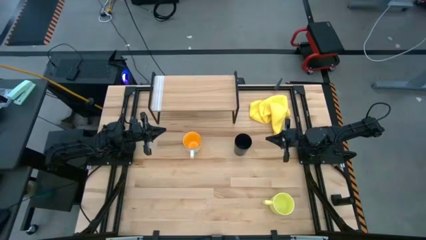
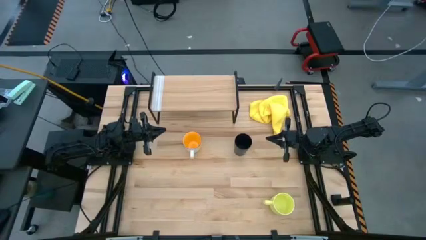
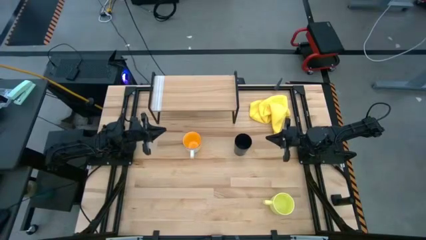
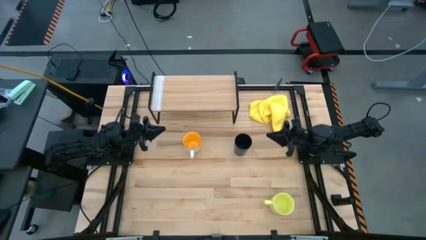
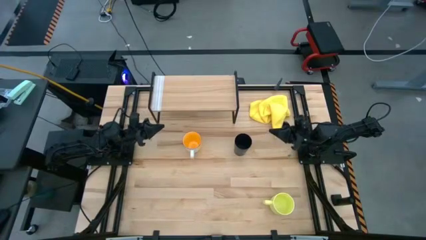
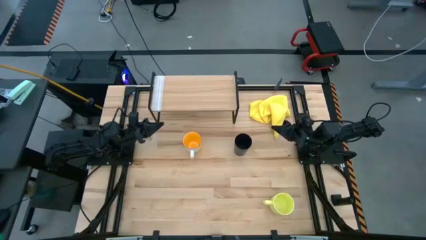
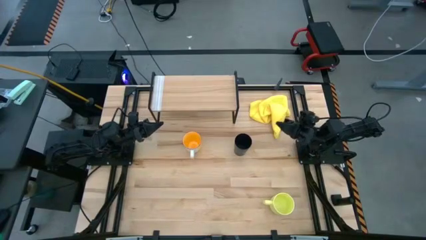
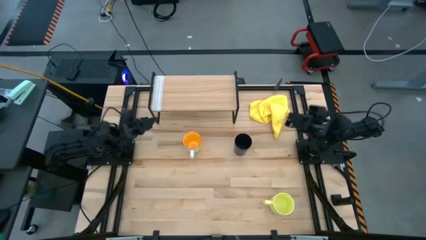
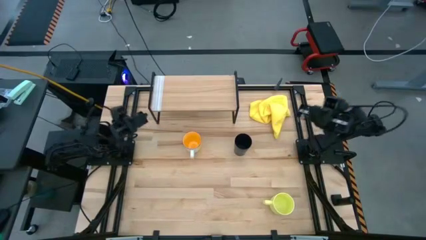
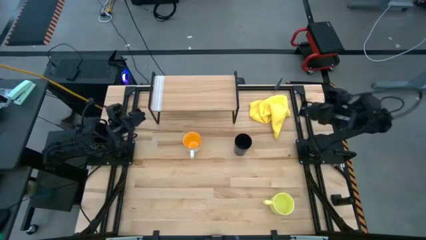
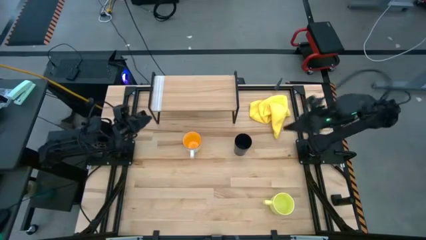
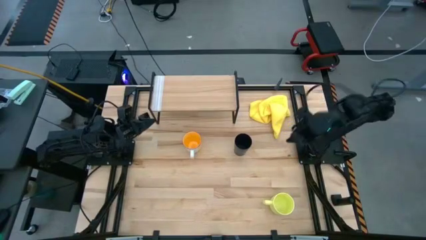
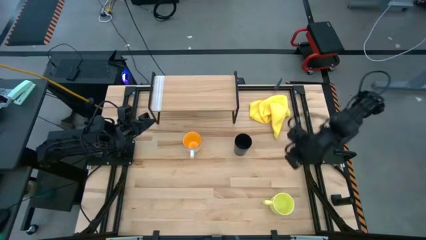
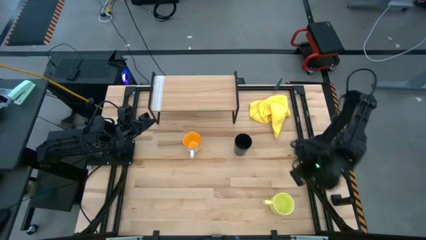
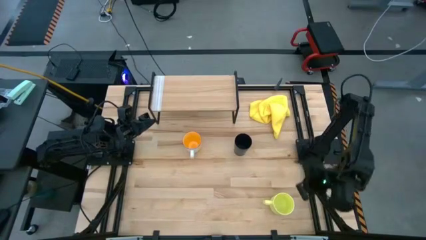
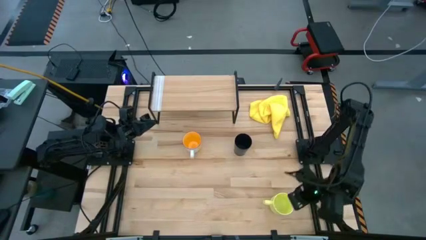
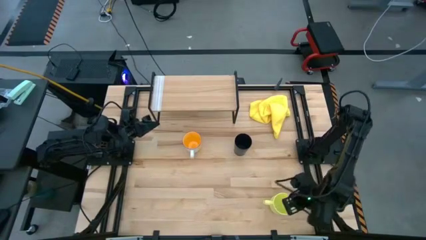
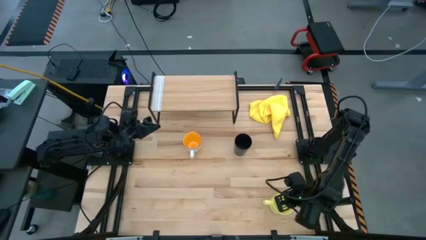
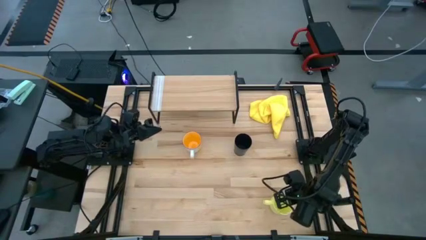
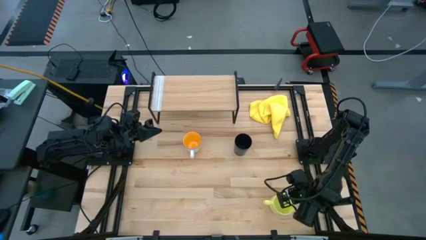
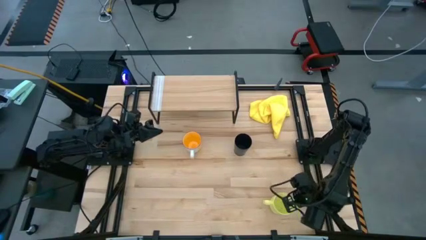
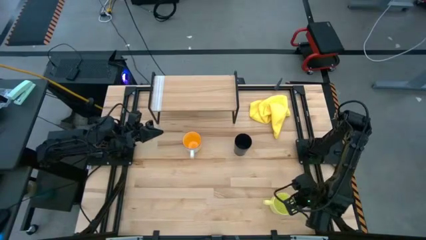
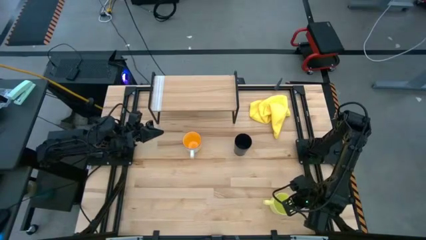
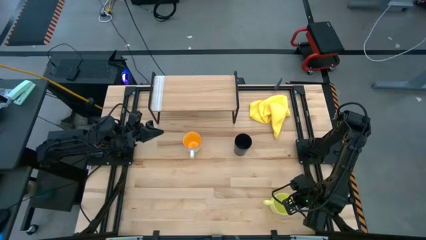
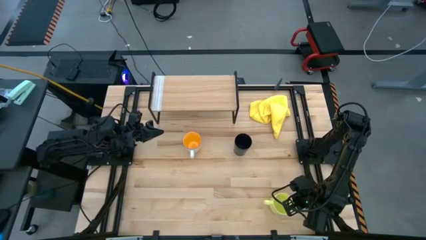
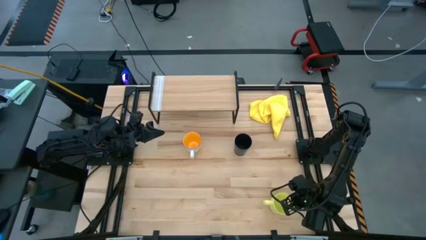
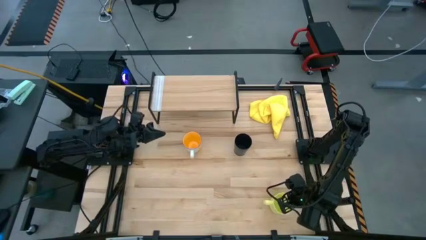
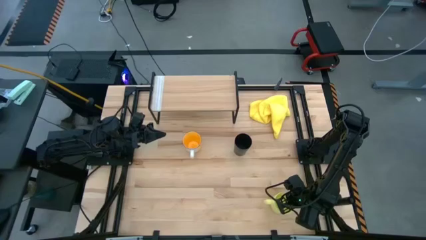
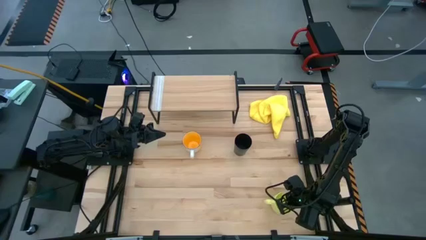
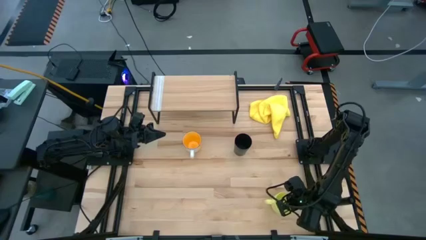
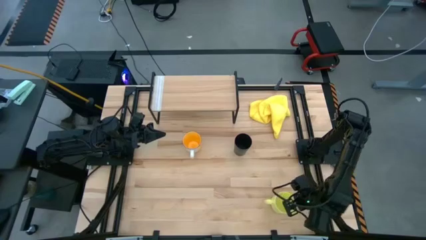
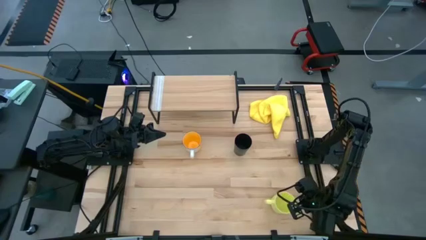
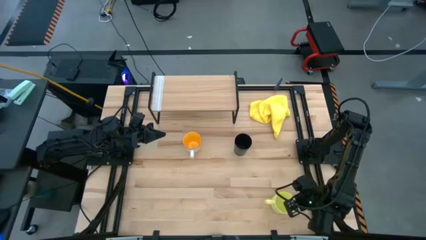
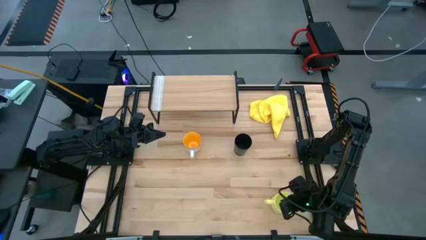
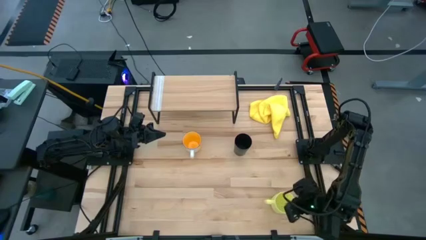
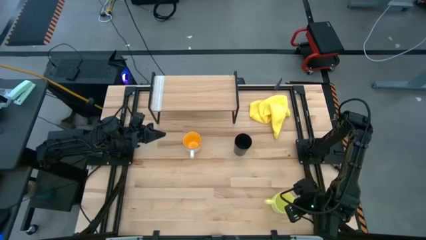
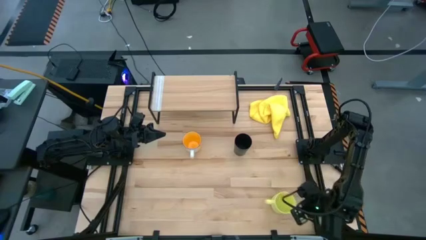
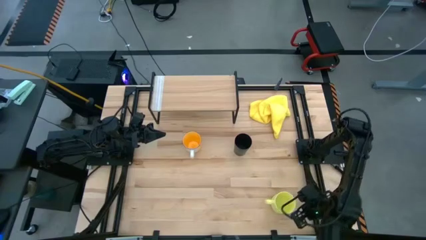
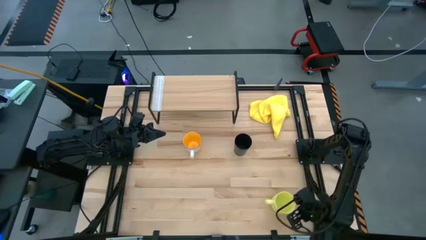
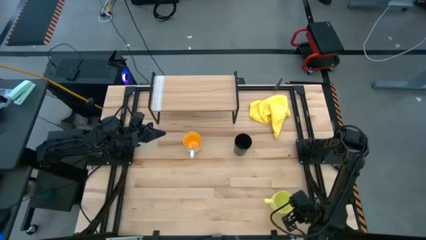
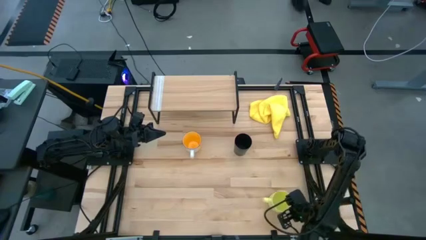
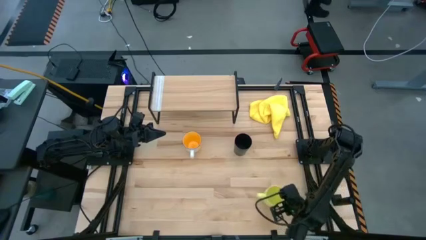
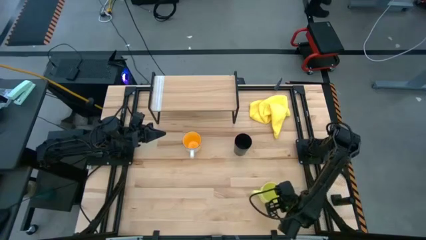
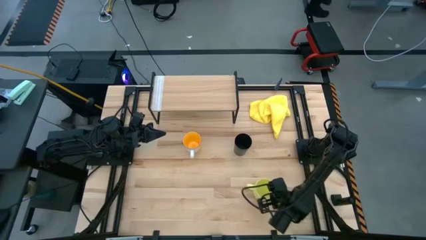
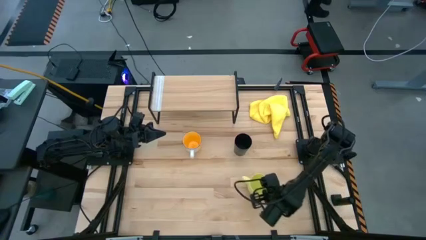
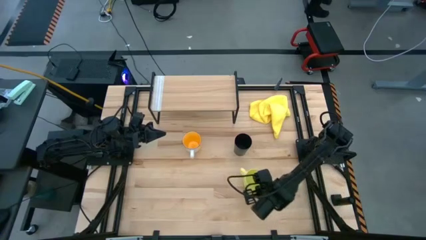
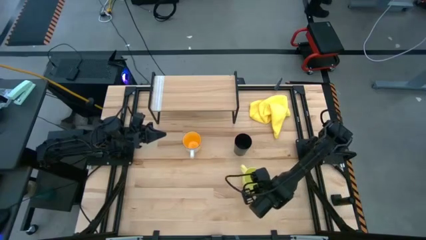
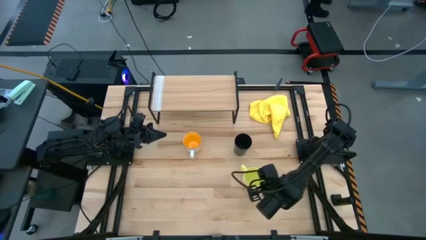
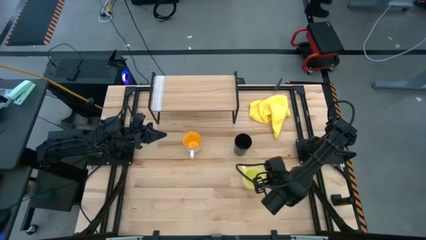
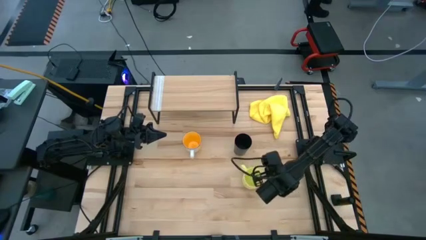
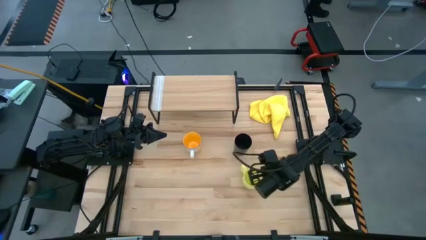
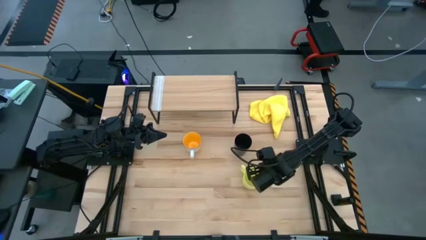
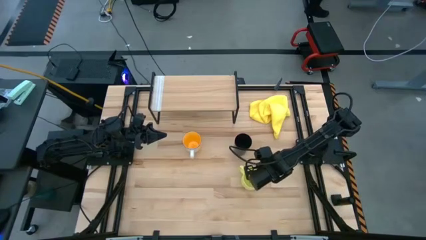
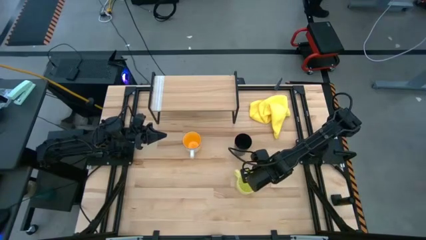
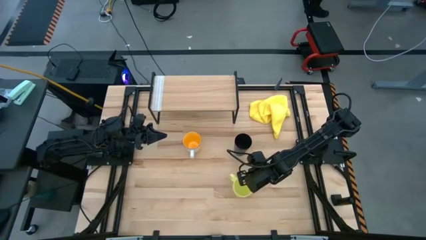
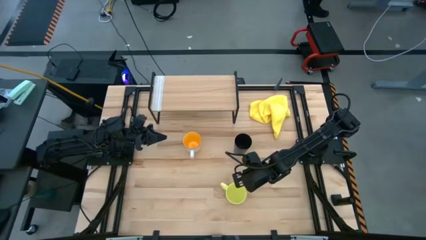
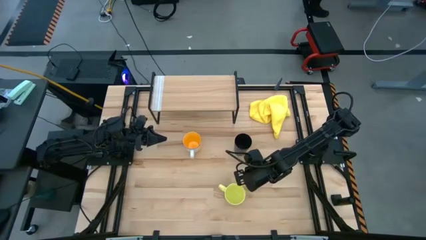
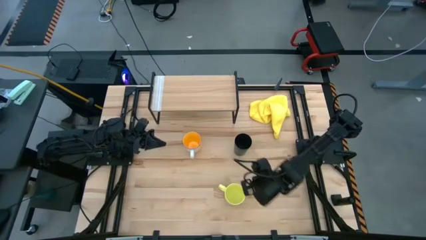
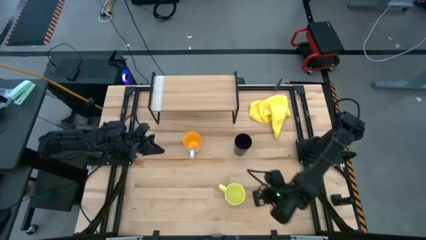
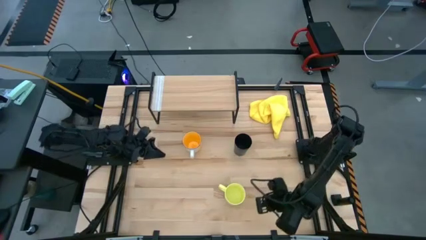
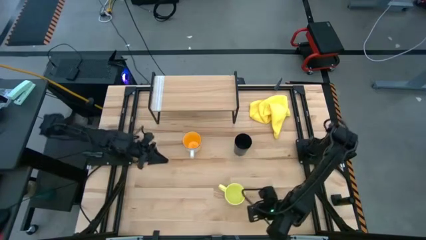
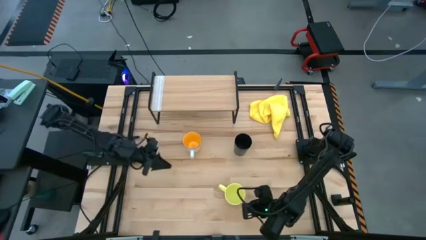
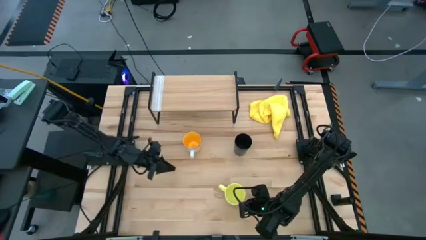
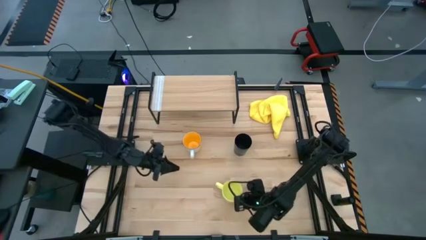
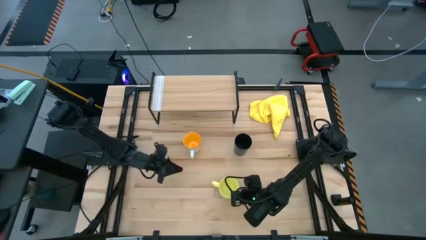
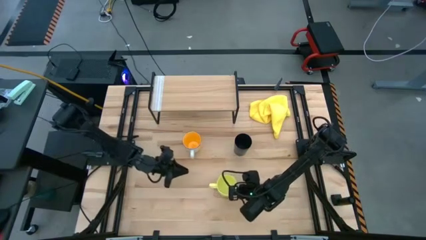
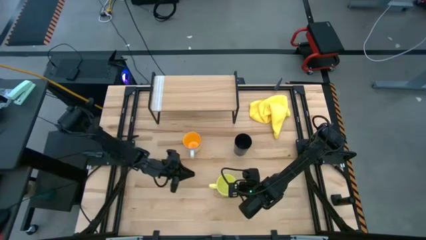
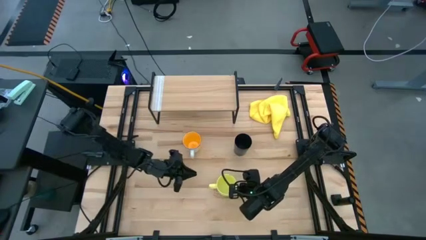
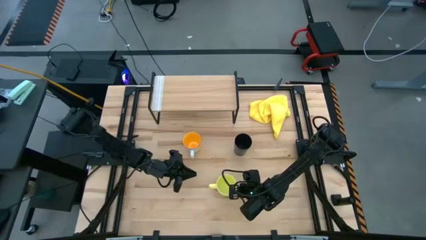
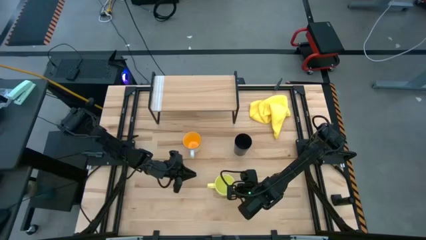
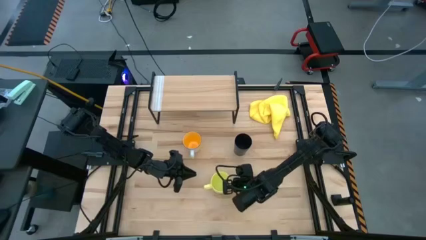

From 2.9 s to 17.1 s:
Task: Stack small to large cups/mugs on shelf
Put the yellow mug on the shelf
